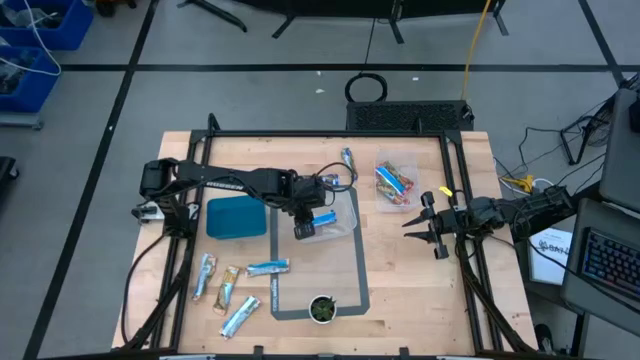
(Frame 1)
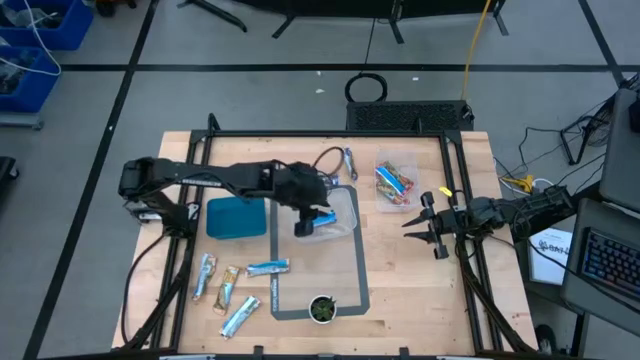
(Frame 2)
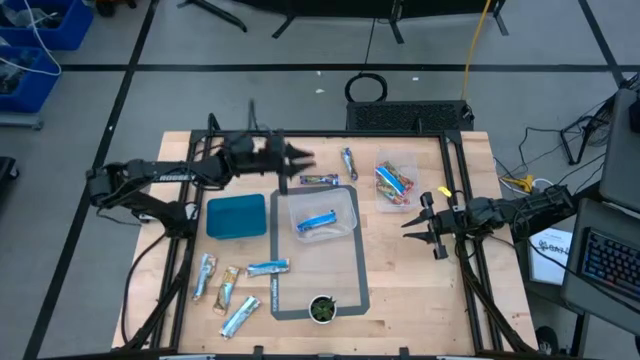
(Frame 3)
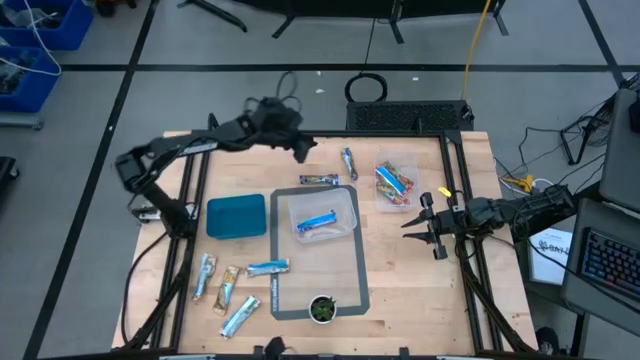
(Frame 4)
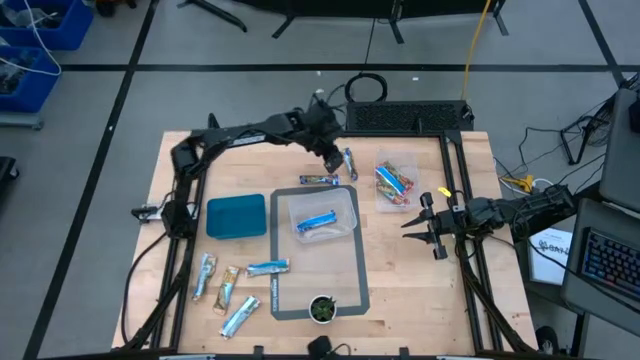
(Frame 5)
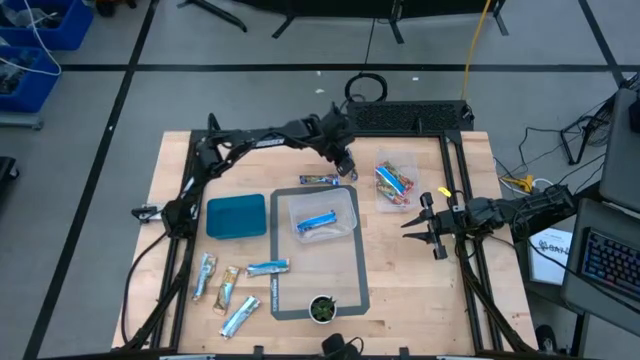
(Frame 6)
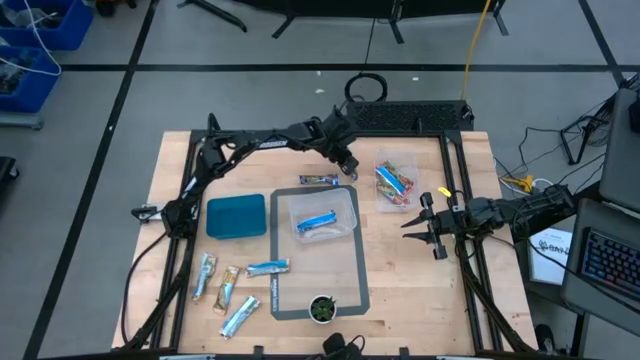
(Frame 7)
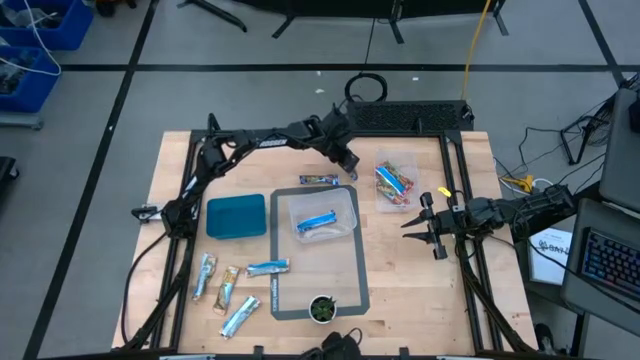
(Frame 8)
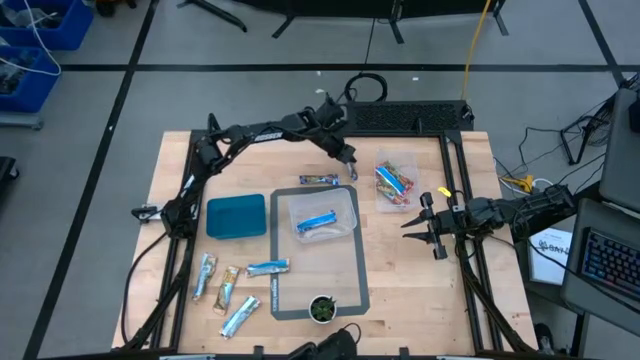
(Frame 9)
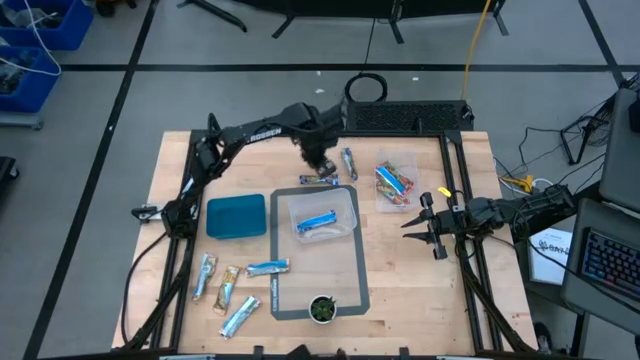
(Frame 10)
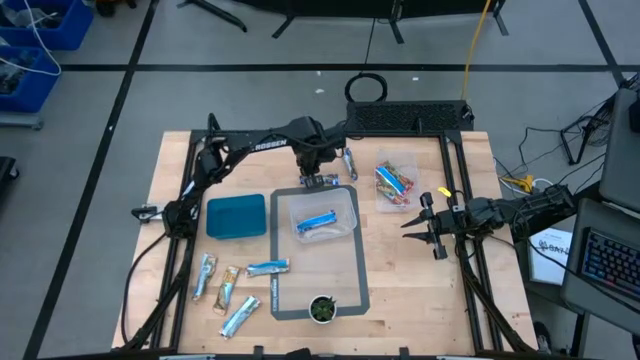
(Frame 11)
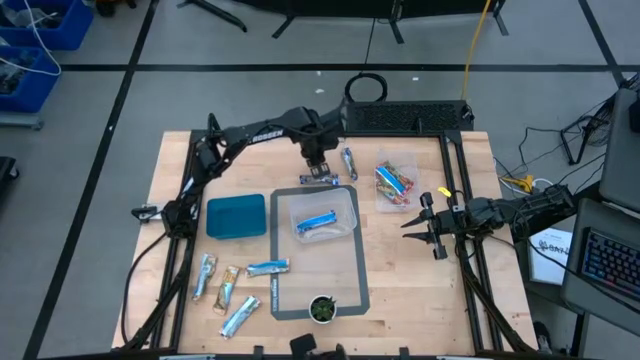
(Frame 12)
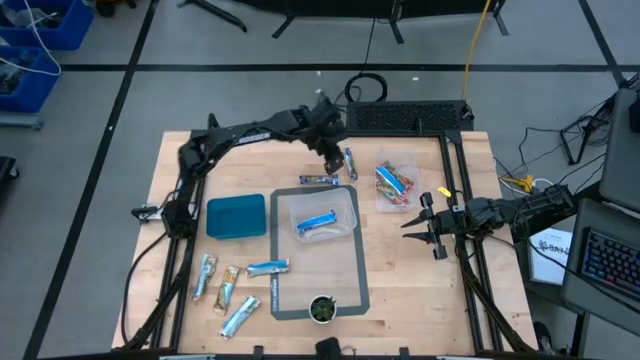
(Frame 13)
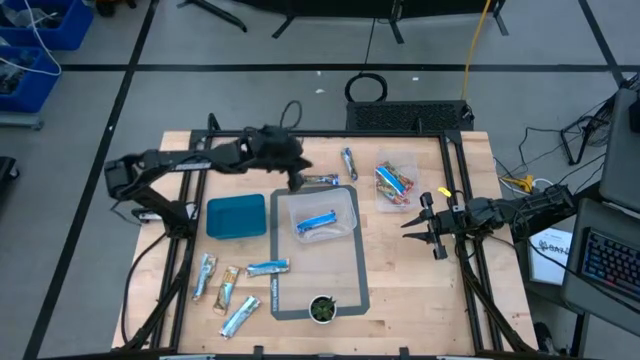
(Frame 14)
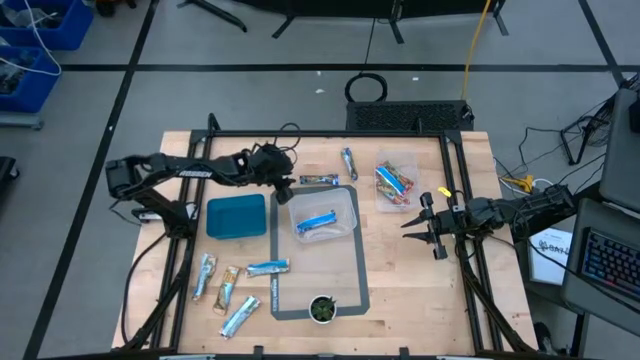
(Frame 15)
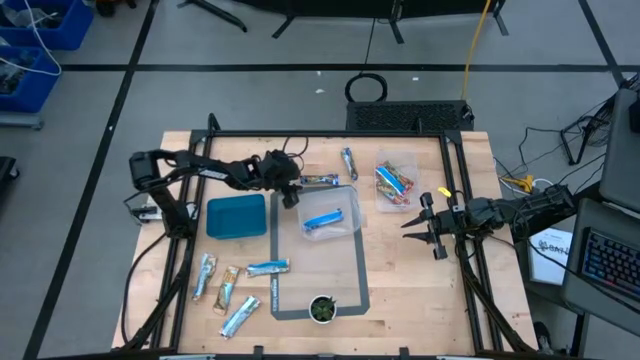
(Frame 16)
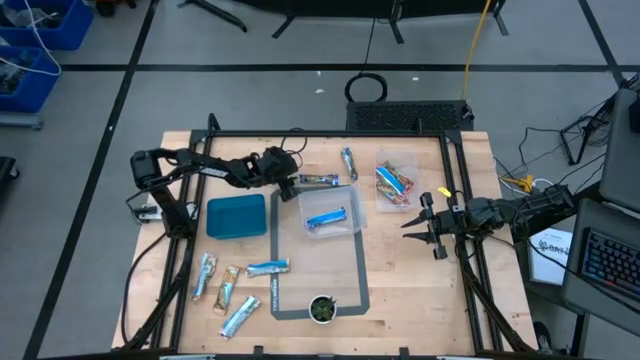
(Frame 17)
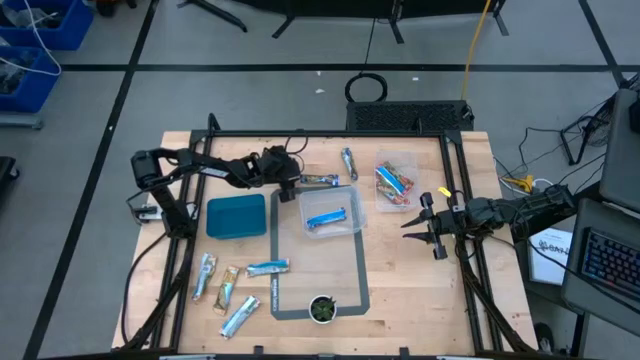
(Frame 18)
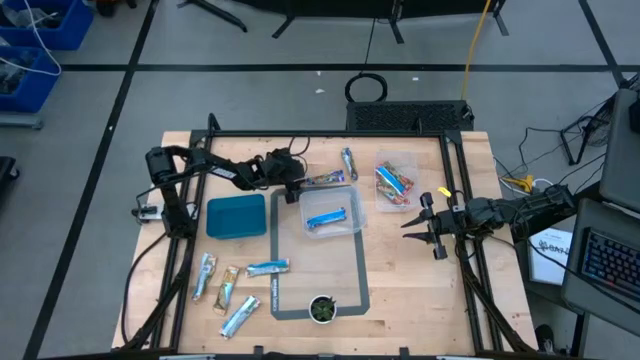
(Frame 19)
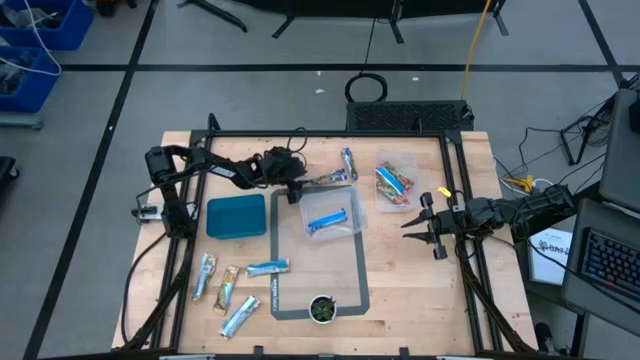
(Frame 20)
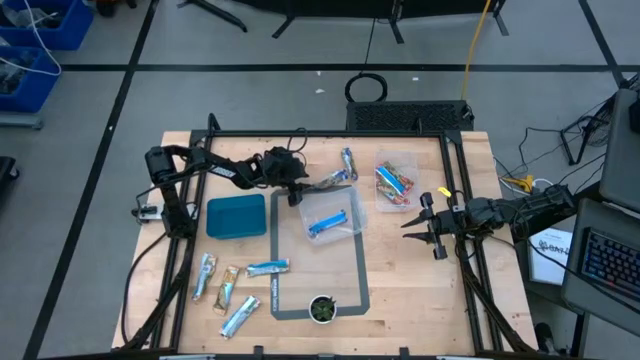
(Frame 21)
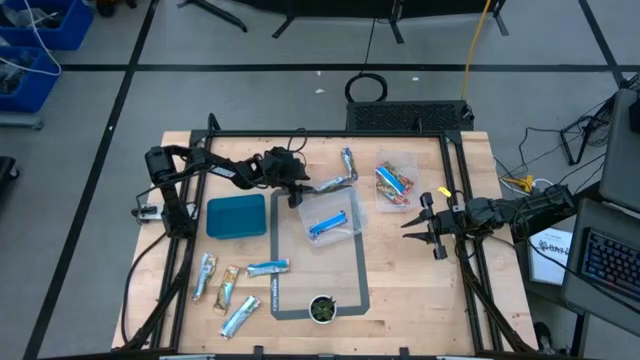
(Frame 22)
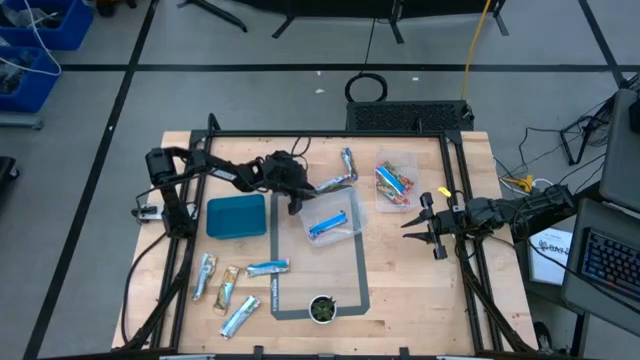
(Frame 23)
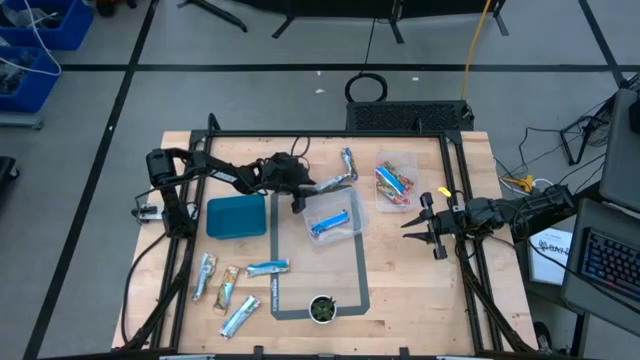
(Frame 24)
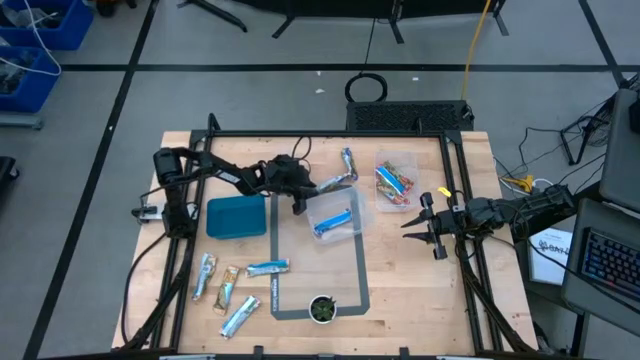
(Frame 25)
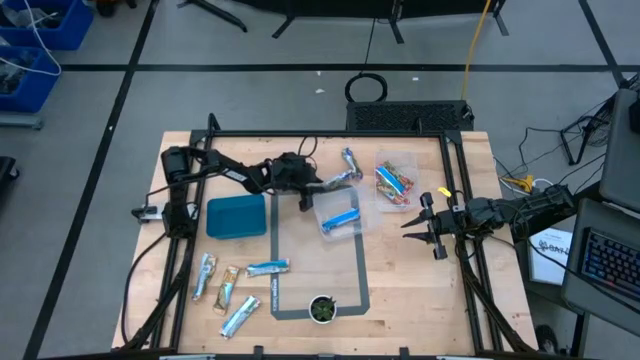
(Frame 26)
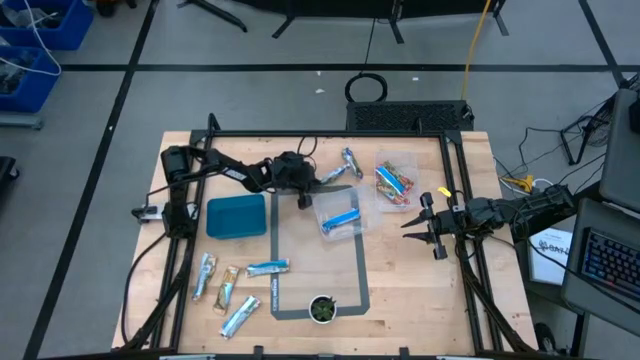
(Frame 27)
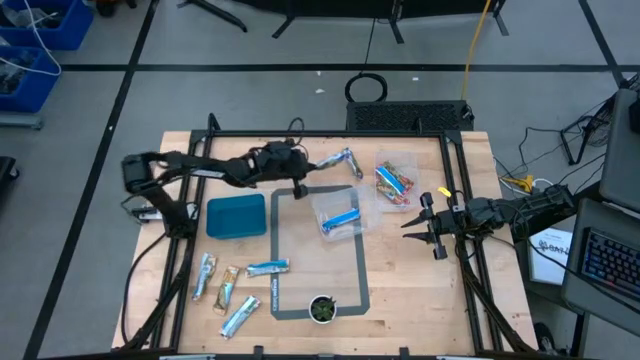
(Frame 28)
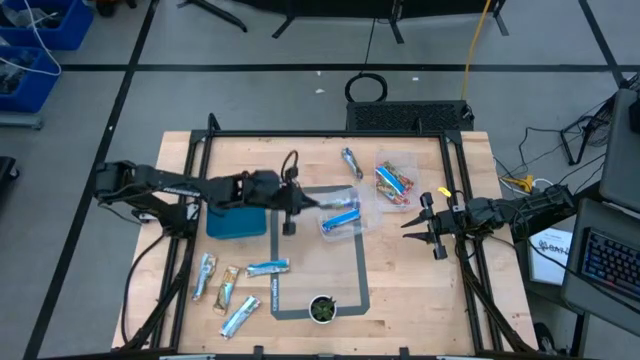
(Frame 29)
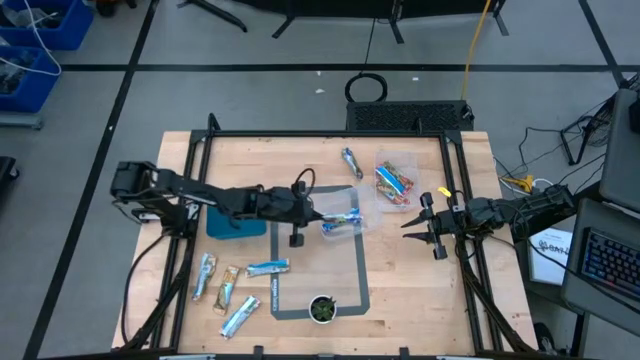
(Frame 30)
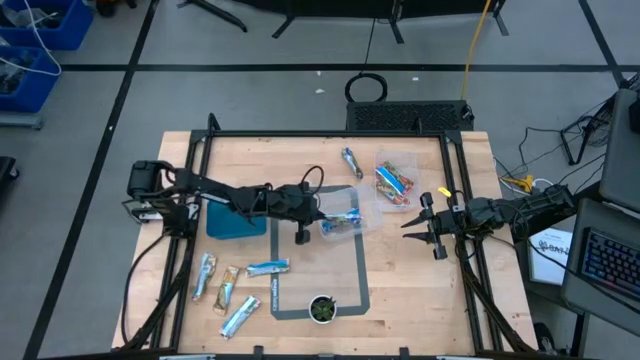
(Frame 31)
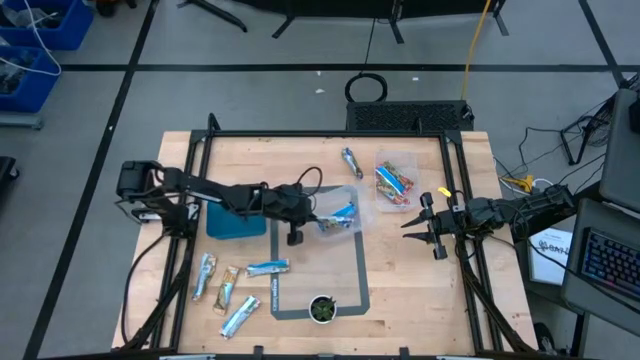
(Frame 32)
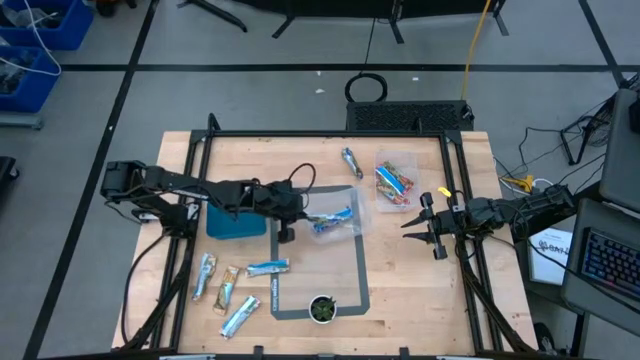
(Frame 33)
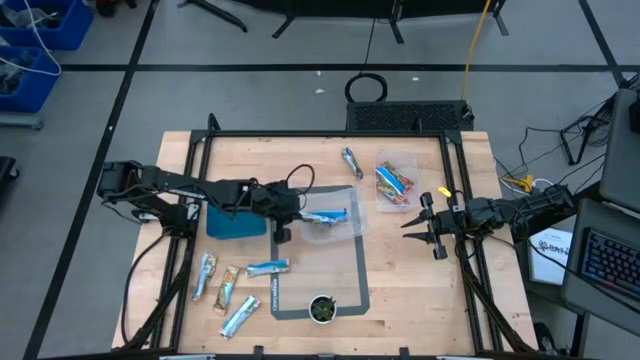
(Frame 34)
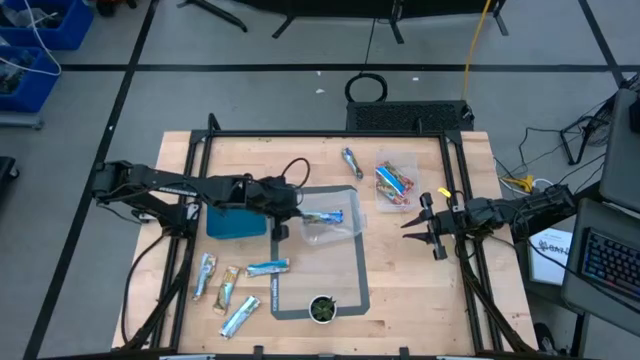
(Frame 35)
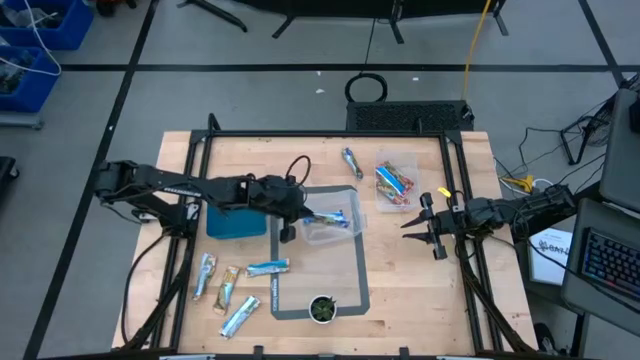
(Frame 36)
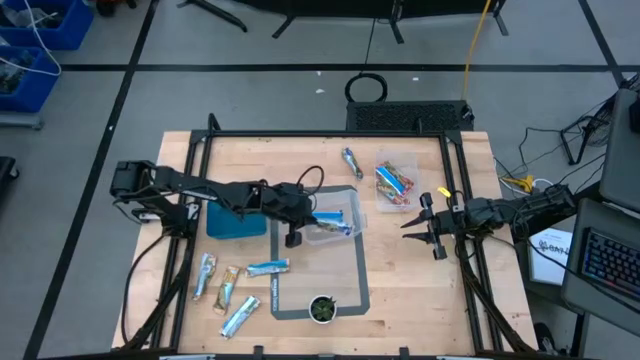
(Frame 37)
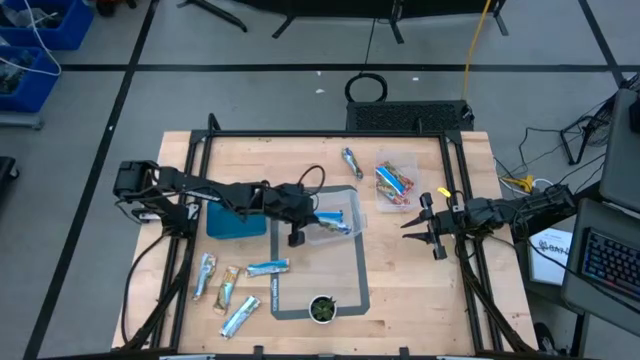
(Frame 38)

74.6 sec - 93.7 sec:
Task: Pick and place Granola Bars by type
Put the blue granola bar into the left transparent bin
